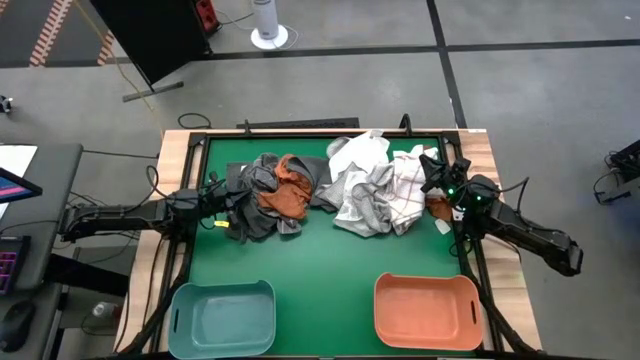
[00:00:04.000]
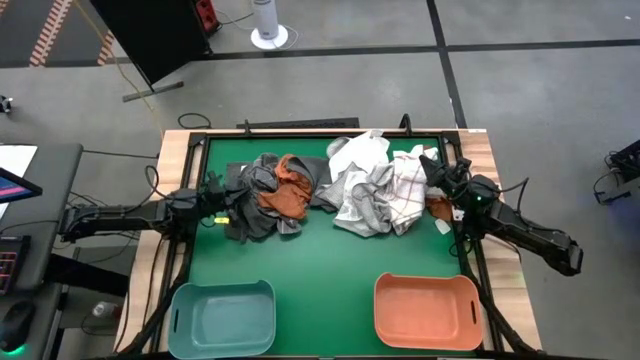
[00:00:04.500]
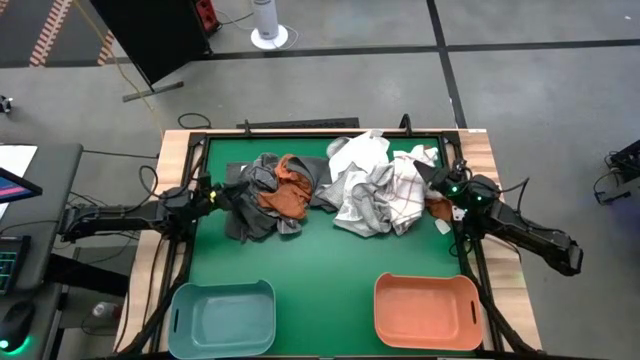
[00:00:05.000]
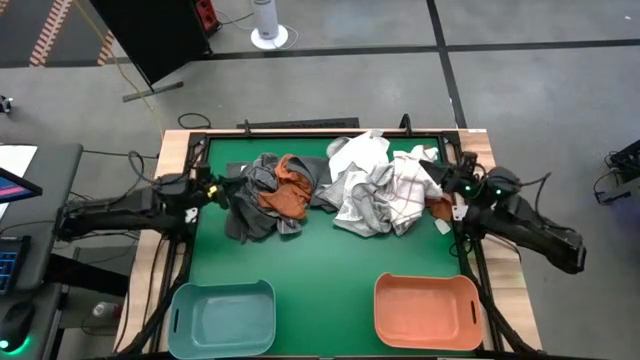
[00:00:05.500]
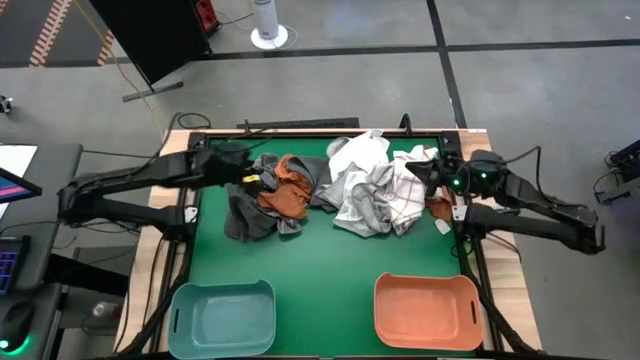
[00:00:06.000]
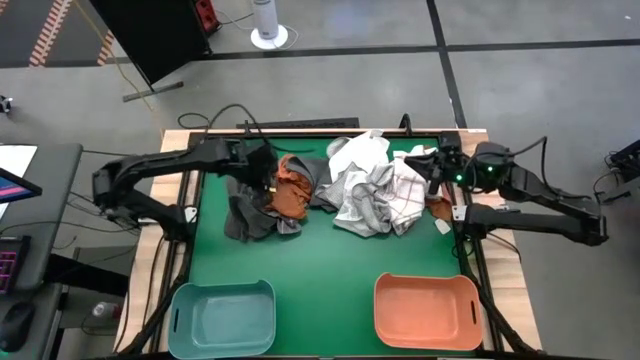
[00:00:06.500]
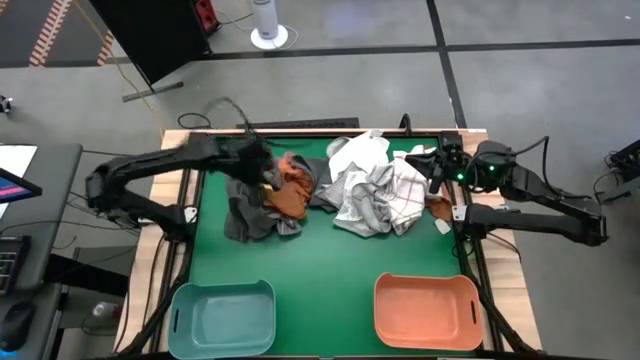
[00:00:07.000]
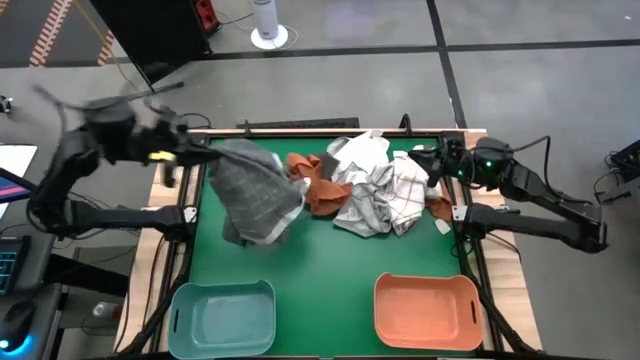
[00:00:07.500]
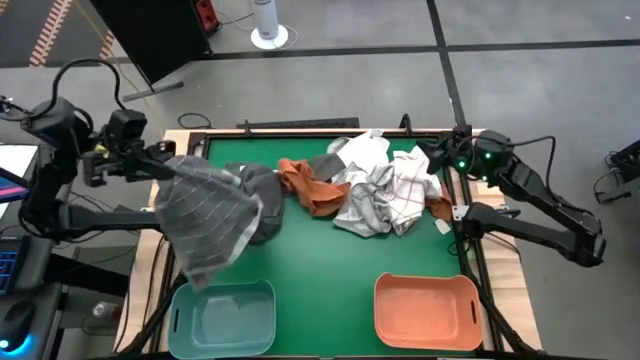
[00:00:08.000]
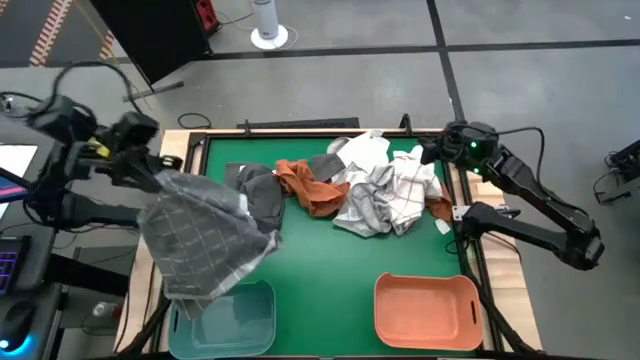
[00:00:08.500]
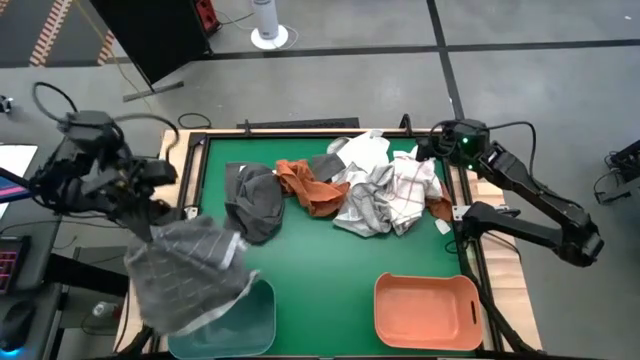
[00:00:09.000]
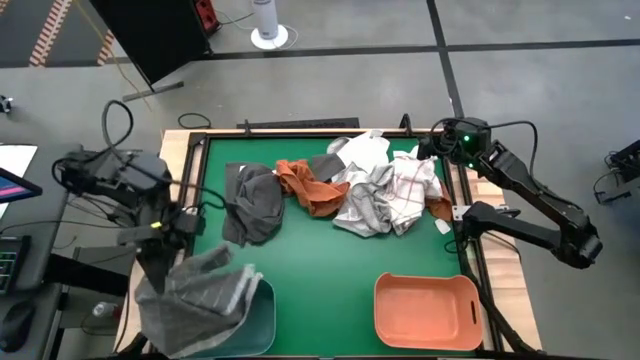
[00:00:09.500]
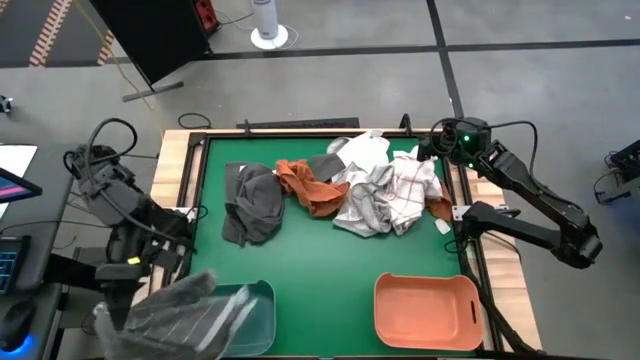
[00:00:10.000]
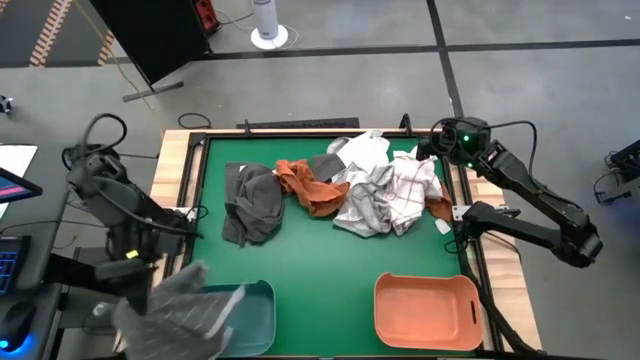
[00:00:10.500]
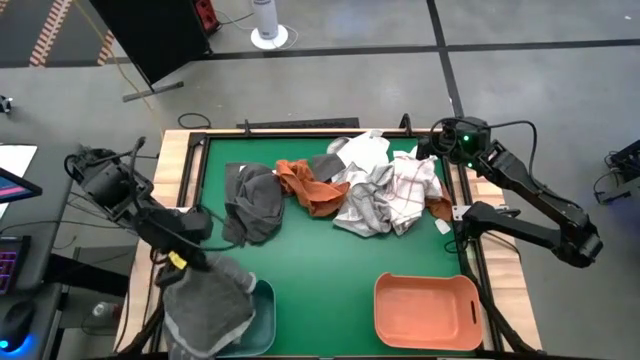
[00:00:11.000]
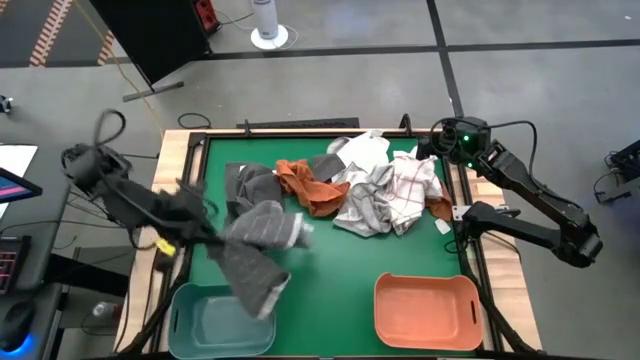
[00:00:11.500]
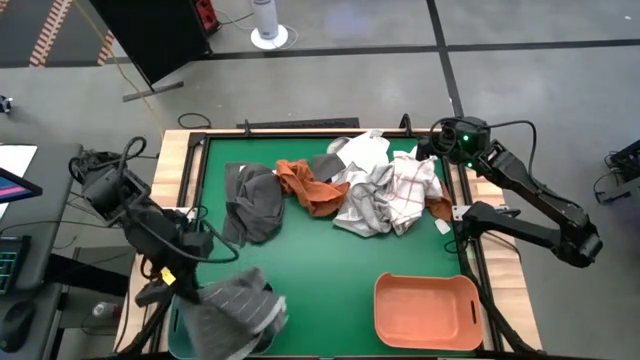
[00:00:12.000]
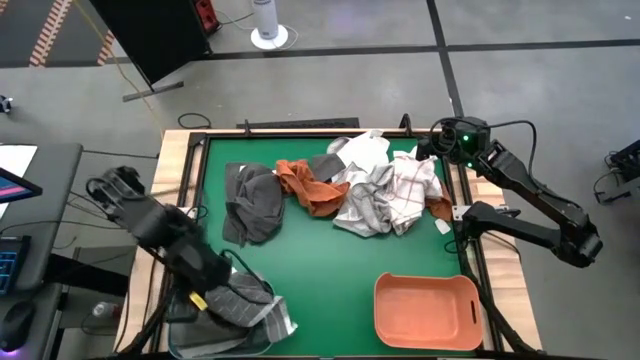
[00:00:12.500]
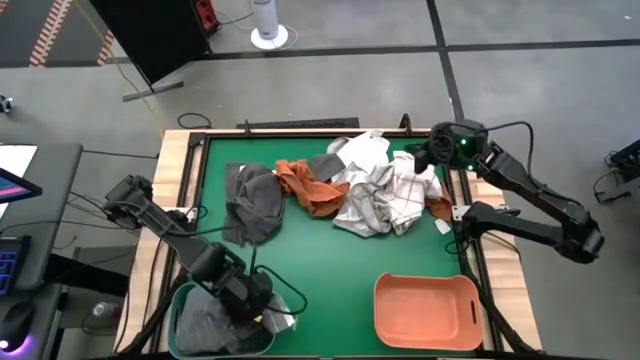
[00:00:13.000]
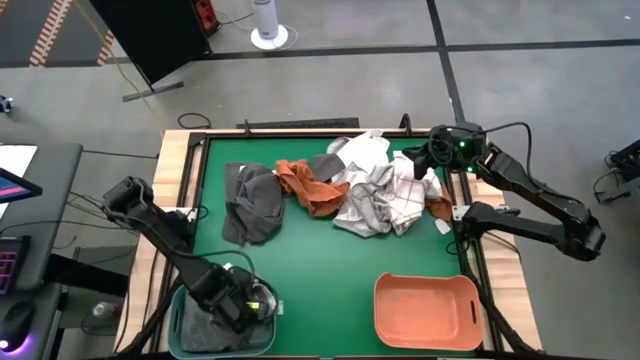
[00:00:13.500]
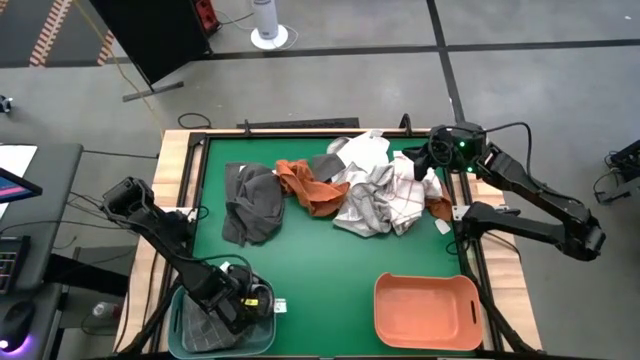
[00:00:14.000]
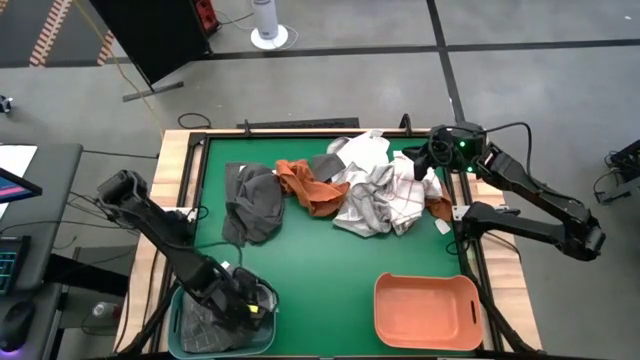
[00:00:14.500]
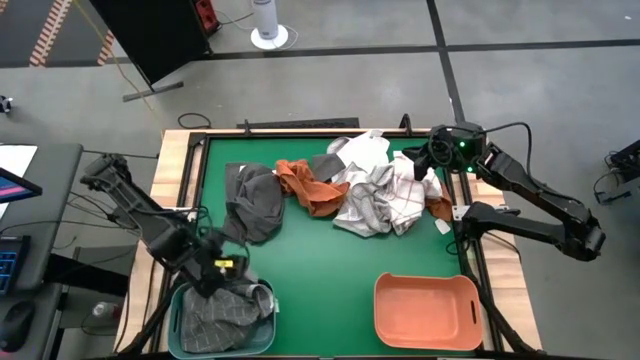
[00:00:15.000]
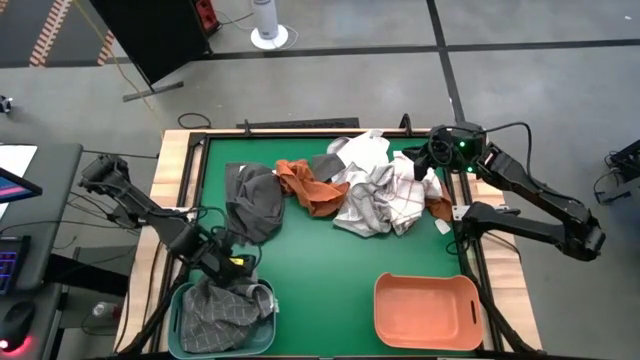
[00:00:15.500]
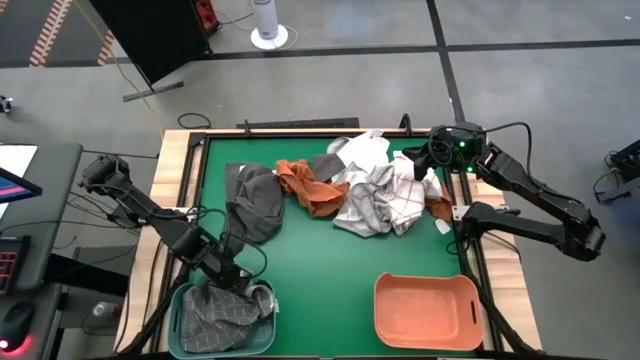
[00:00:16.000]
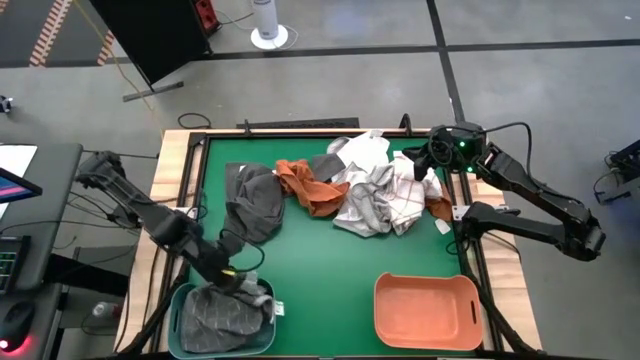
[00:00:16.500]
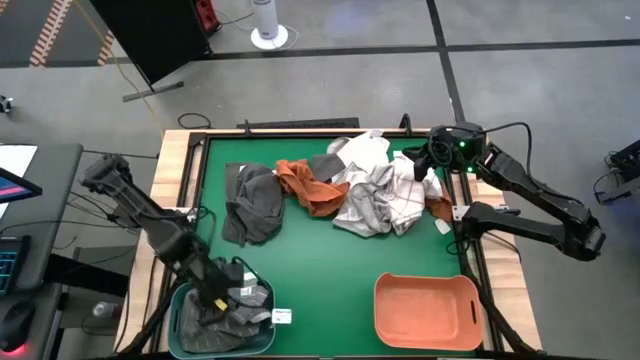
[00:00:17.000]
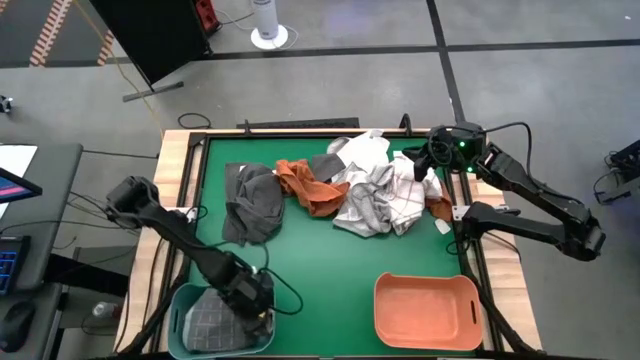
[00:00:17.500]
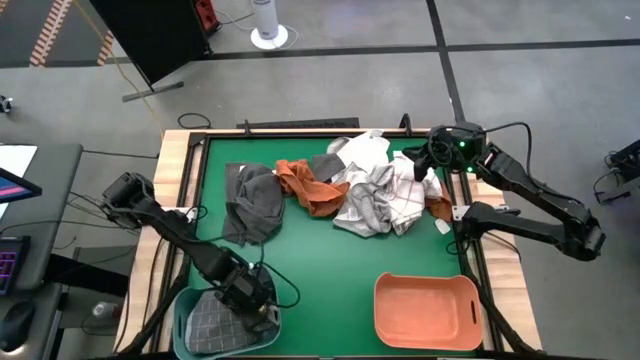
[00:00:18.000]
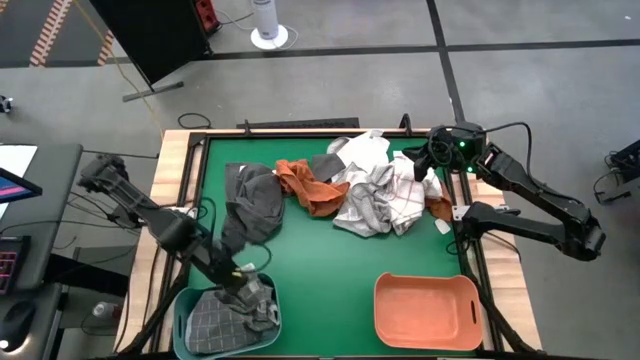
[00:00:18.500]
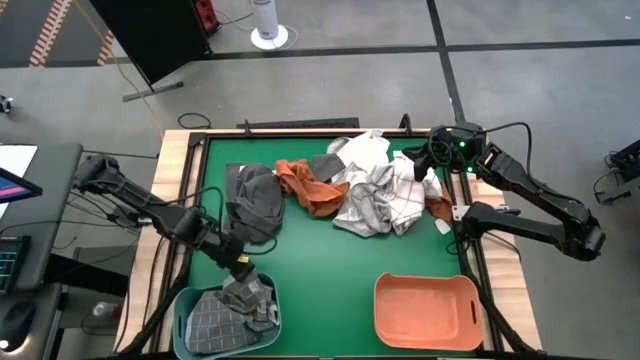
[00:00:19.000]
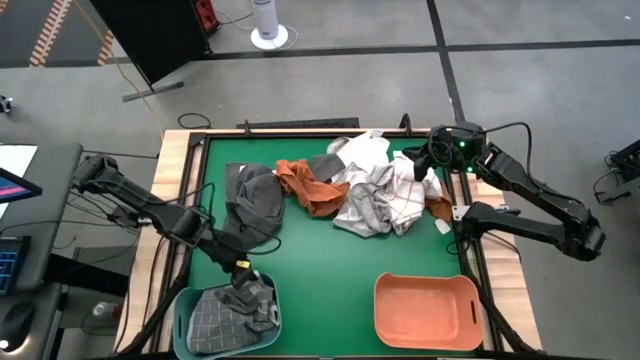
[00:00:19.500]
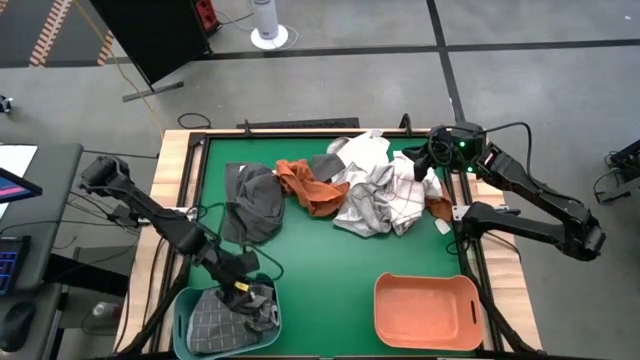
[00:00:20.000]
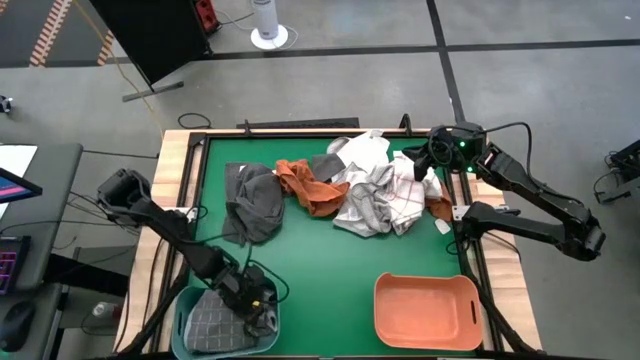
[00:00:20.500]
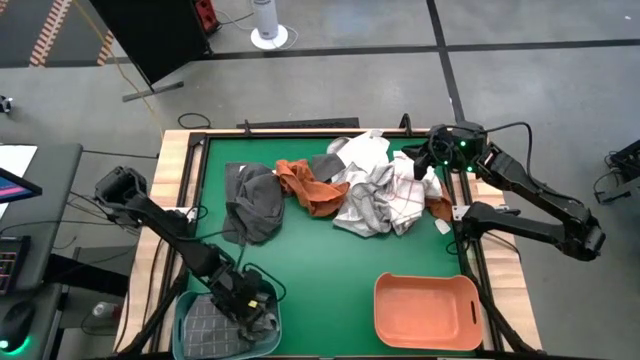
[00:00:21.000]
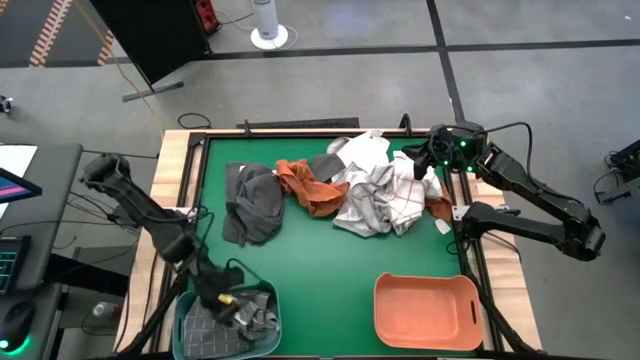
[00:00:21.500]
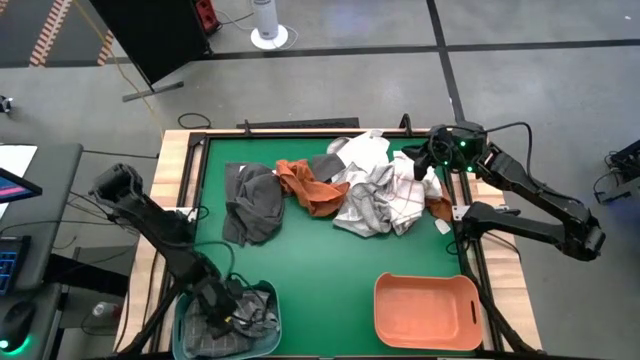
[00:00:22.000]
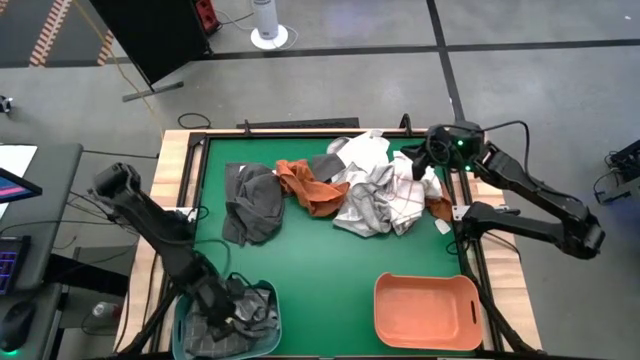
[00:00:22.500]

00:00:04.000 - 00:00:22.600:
Task: Sort towels by color in basket
Put the gray checkered towel into the green bin
